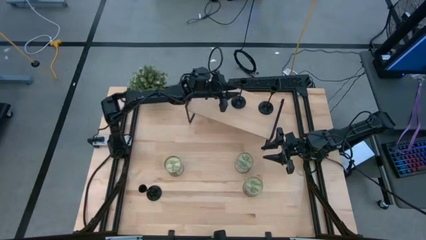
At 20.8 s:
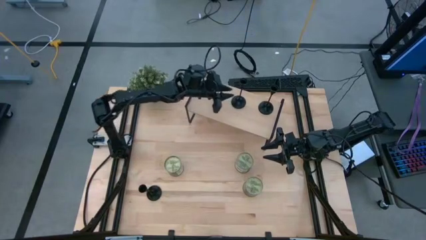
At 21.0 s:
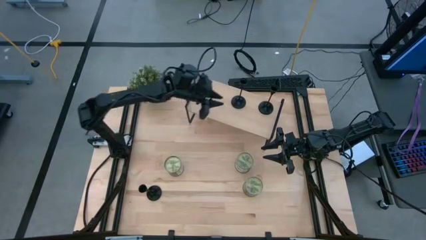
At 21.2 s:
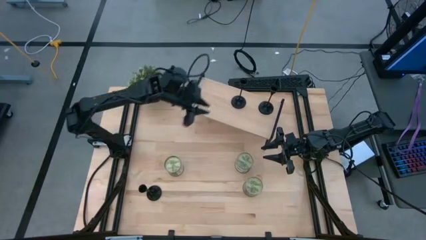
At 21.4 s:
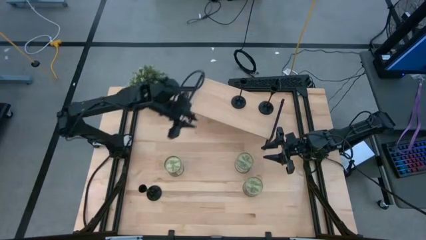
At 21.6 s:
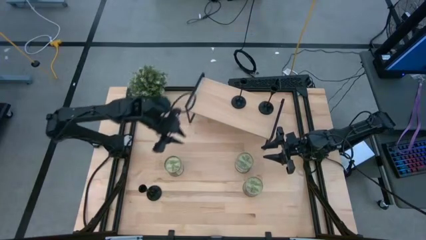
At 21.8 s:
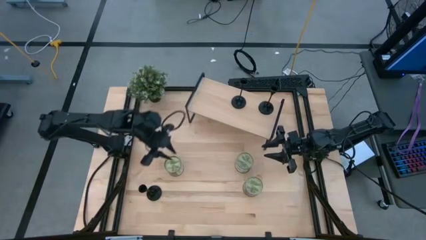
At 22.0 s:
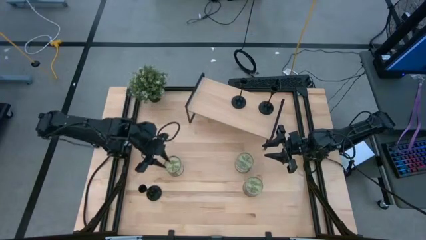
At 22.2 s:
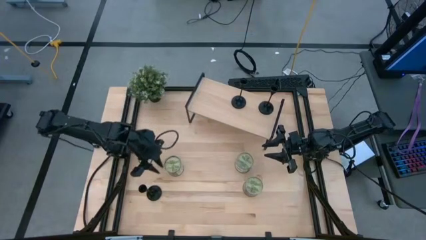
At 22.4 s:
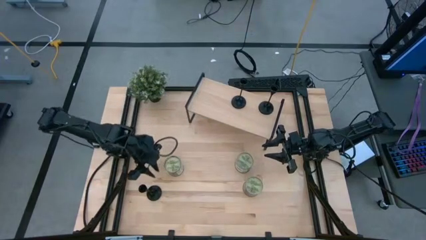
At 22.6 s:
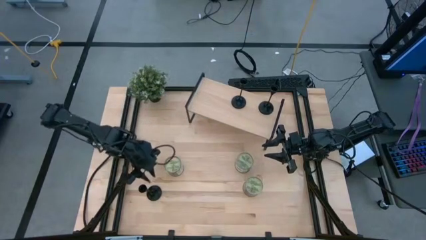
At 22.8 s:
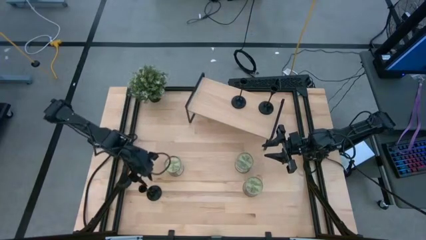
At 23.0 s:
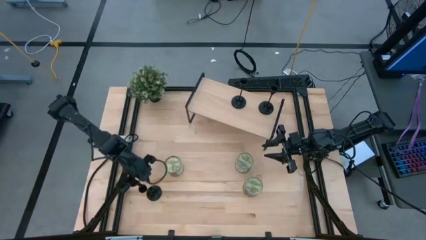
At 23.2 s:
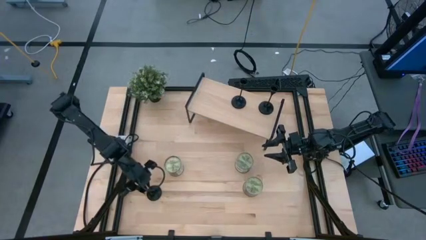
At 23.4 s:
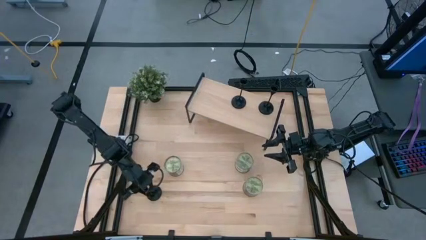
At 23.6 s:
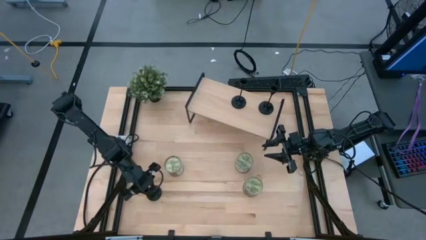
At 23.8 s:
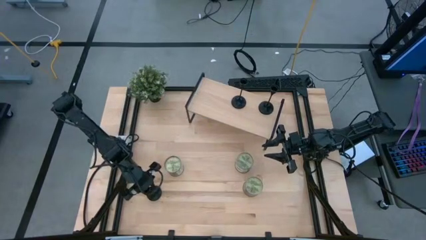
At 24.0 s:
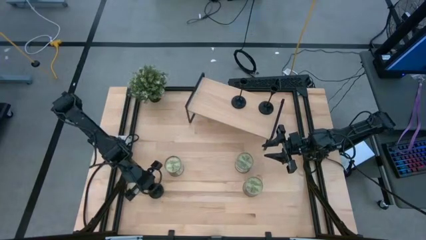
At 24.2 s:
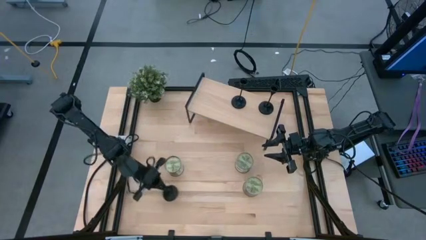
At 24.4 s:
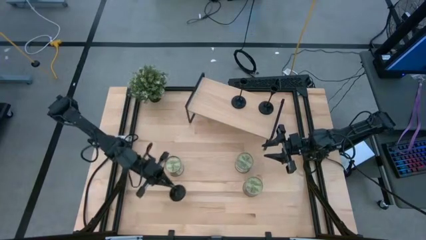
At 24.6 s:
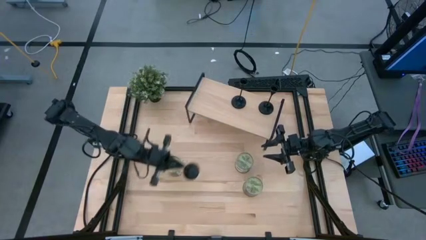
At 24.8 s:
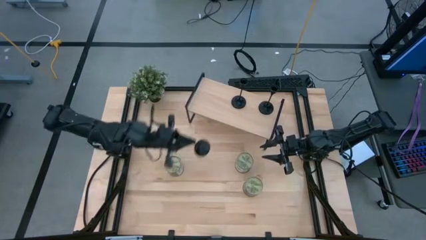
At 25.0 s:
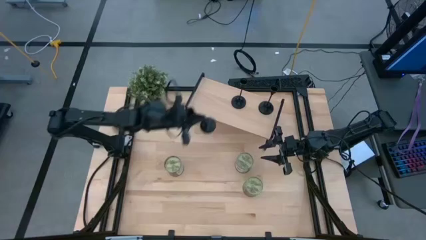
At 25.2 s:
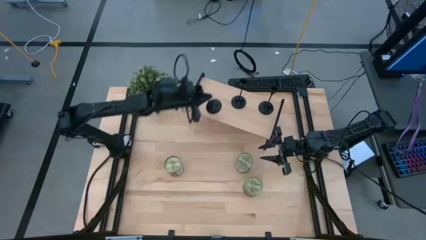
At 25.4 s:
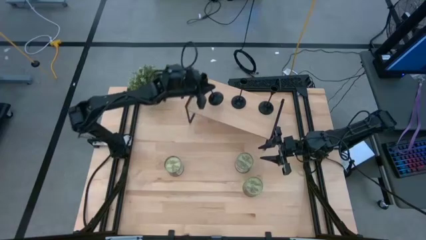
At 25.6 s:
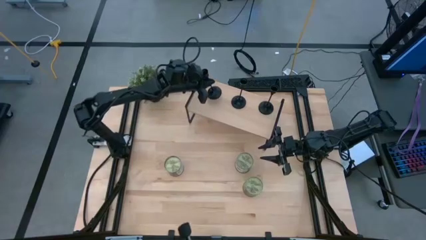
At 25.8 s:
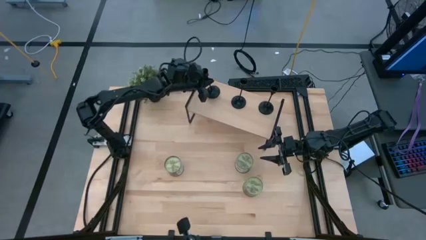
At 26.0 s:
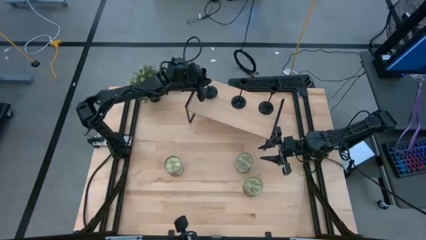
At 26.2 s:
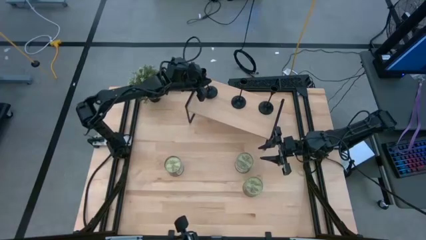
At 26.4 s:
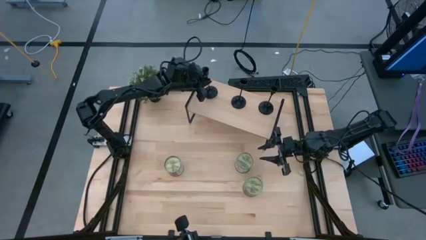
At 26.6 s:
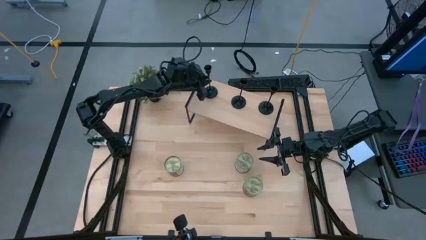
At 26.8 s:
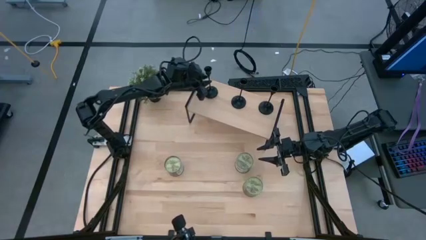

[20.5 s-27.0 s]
Task: Pick & Place candle stick holders
Align the black candle holder with the other black candle holder on the shelf

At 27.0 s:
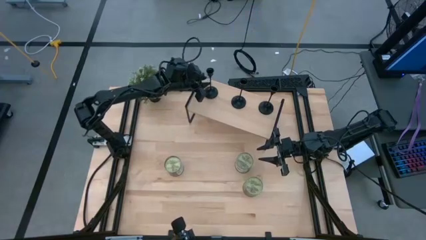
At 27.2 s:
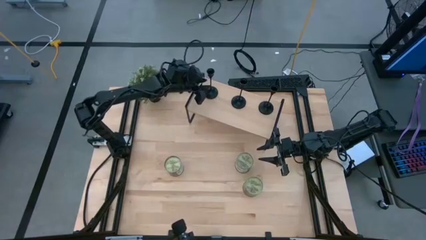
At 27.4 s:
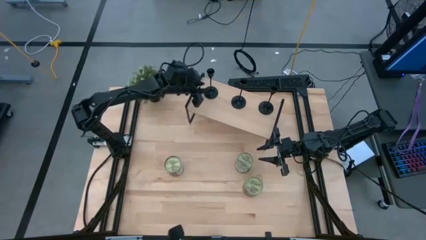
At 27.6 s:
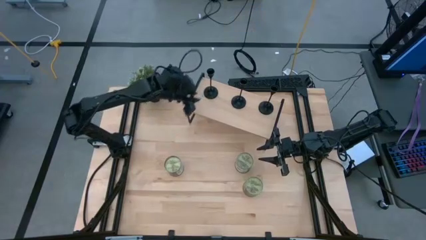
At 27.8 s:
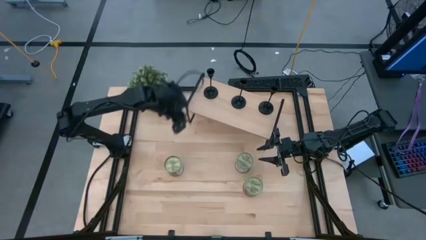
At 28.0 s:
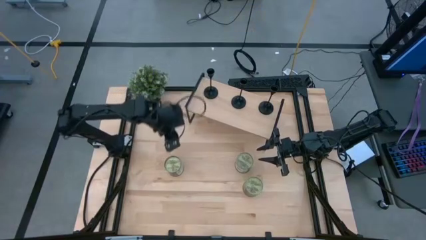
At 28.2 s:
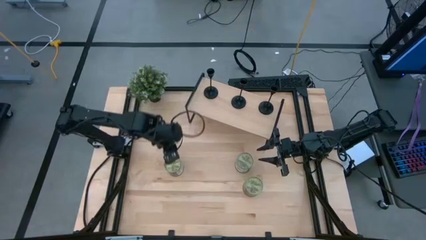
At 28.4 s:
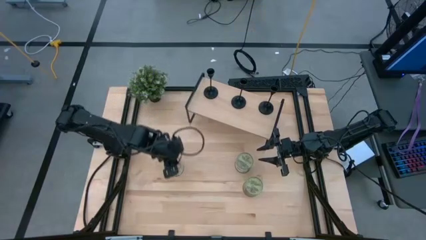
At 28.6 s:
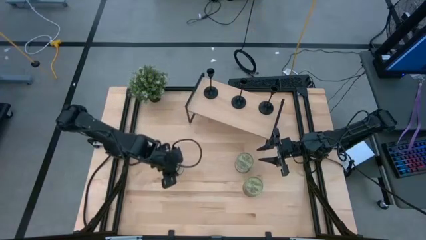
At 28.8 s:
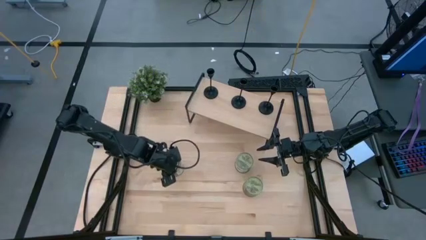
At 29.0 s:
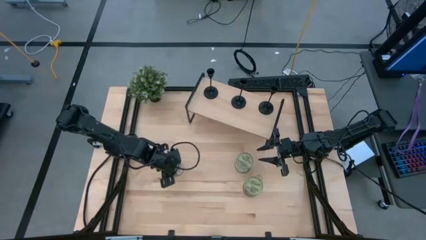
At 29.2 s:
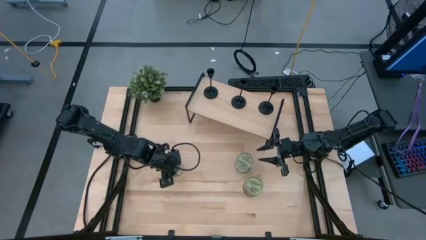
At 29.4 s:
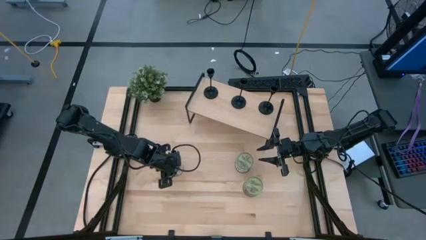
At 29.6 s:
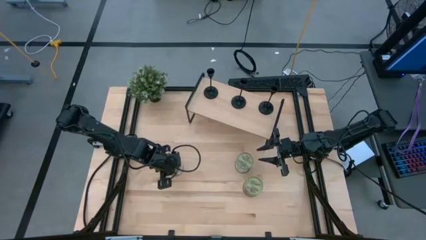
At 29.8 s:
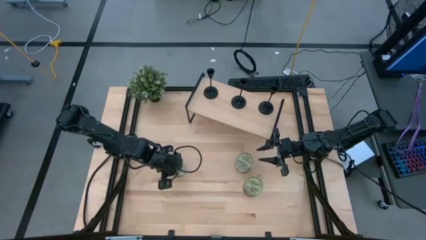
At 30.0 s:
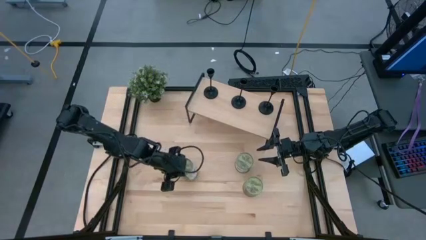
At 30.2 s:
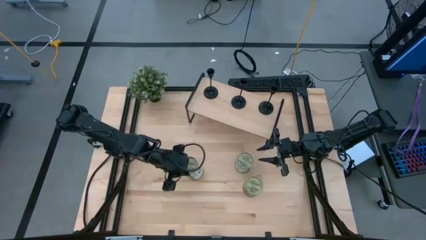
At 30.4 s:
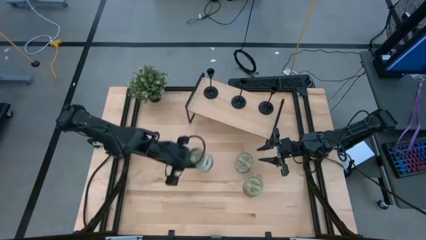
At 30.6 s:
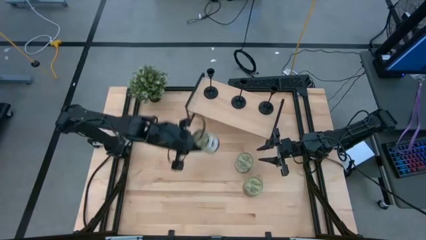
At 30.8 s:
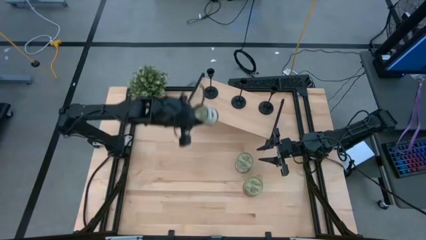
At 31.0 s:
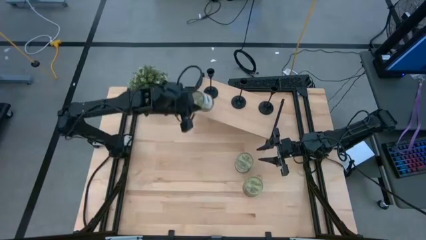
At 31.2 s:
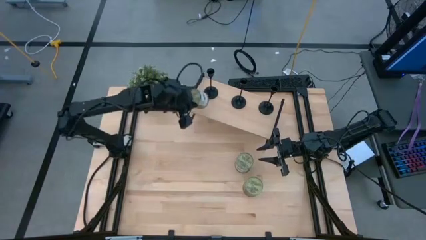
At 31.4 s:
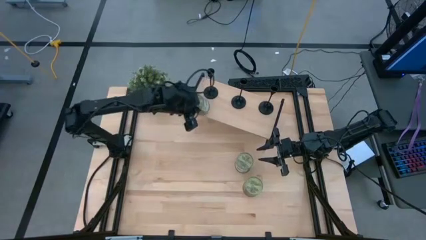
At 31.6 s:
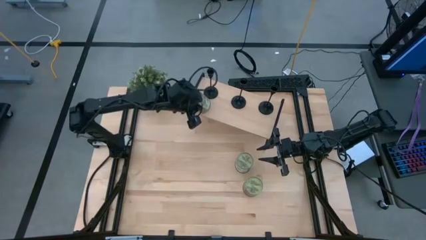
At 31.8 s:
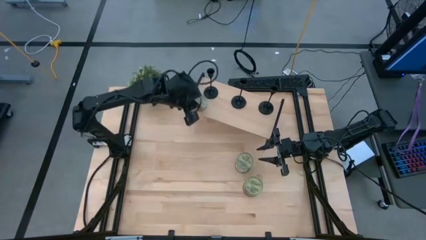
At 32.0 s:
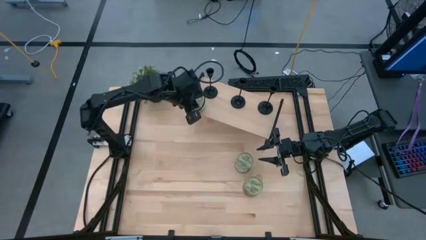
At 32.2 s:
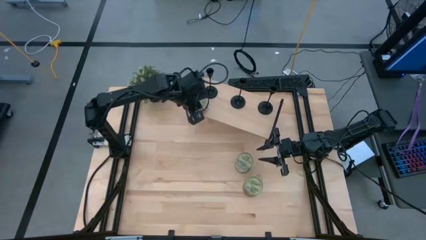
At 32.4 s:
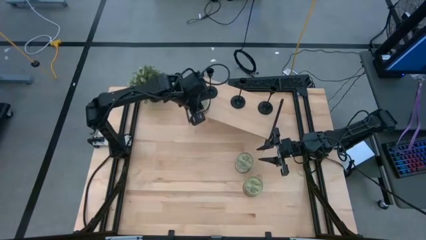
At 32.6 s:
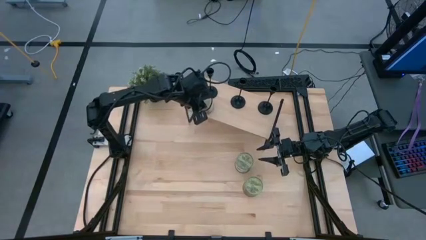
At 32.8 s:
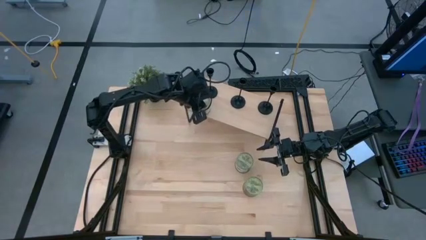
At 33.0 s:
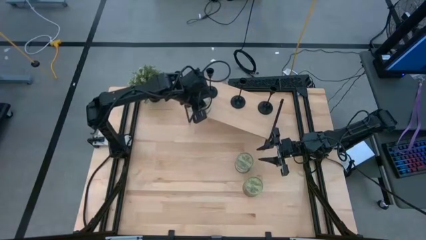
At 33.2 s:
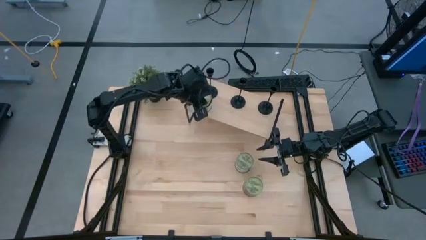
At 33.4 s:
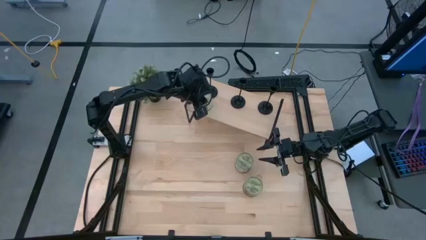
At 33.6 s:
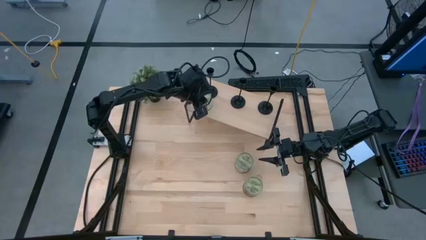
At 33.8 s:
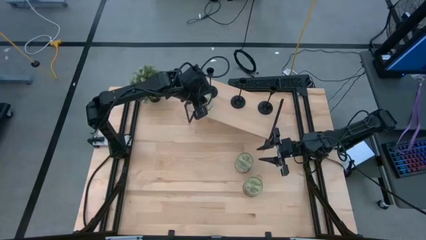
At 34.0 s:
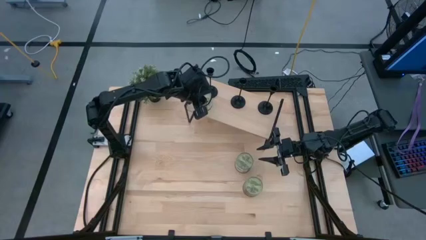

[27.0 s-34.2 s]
Put the left silver scented candle on the shelf

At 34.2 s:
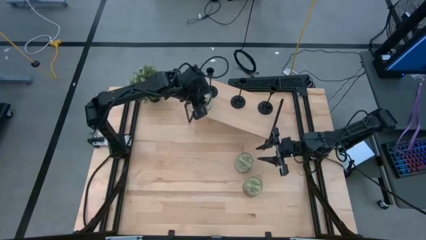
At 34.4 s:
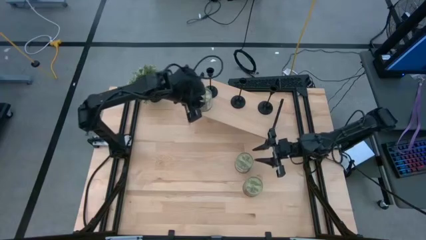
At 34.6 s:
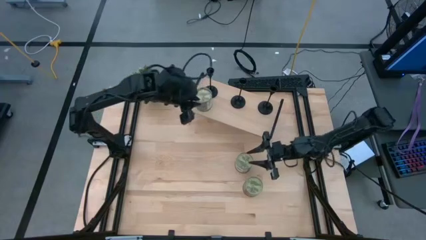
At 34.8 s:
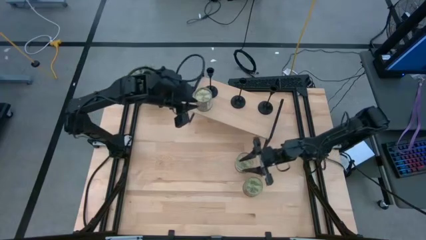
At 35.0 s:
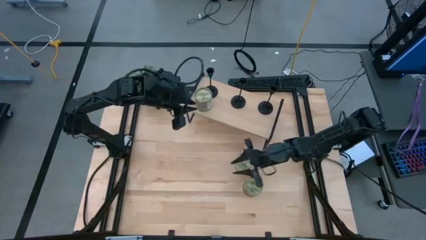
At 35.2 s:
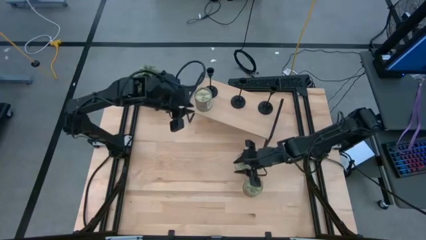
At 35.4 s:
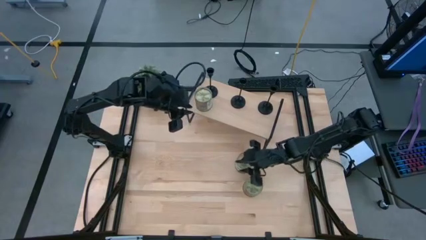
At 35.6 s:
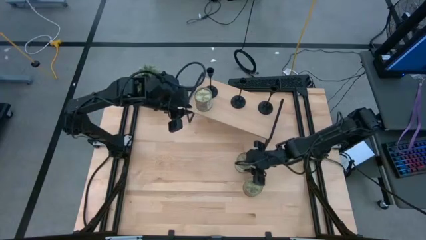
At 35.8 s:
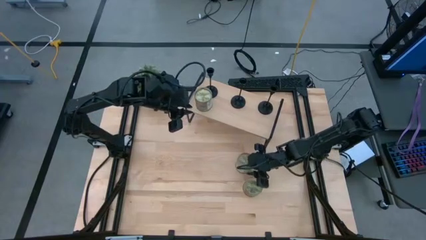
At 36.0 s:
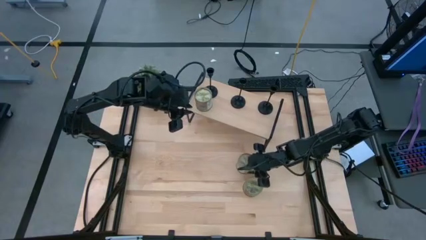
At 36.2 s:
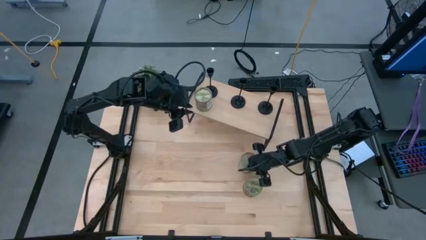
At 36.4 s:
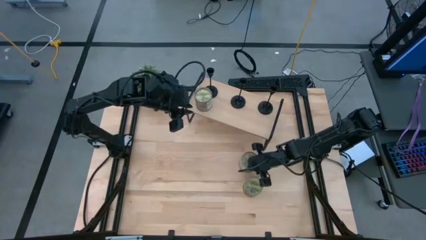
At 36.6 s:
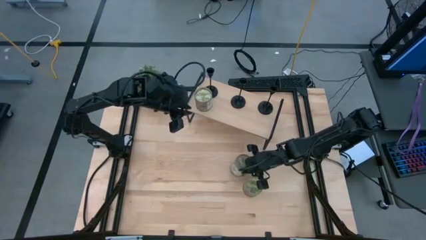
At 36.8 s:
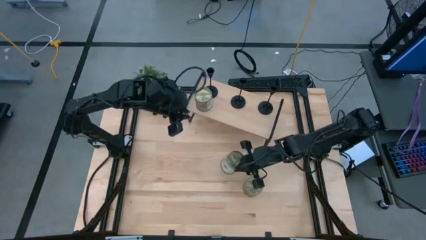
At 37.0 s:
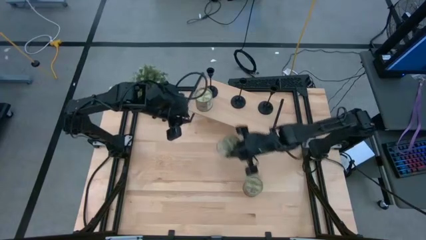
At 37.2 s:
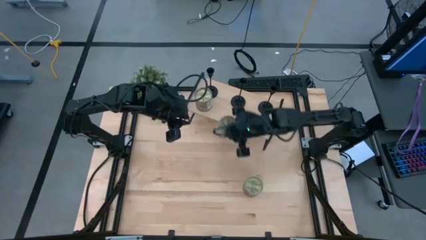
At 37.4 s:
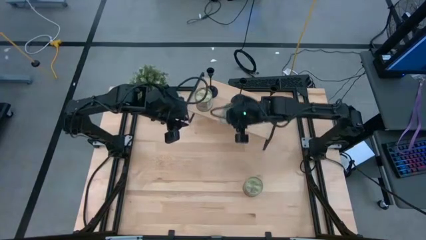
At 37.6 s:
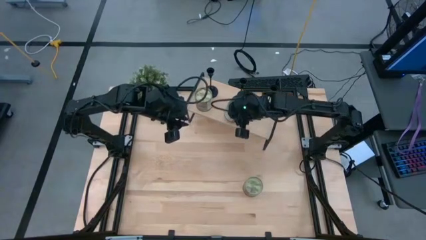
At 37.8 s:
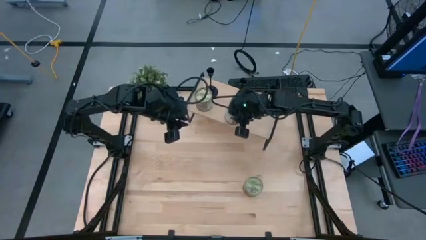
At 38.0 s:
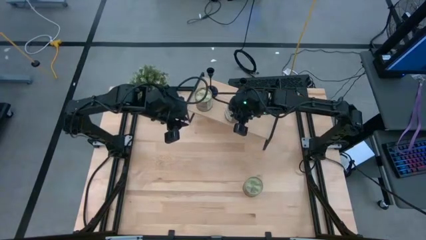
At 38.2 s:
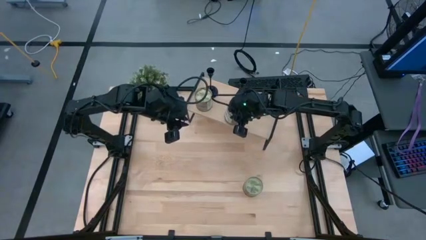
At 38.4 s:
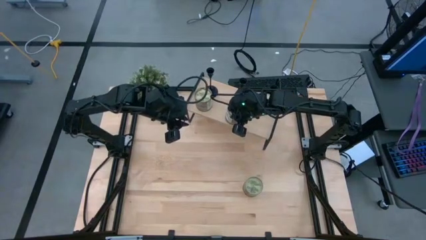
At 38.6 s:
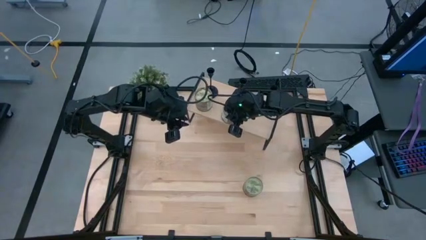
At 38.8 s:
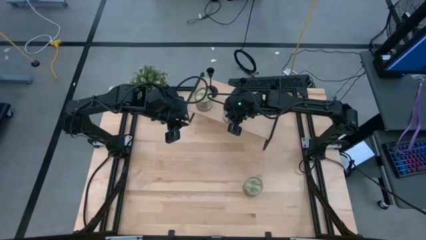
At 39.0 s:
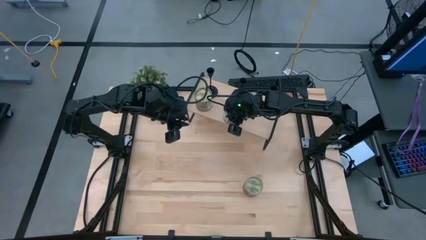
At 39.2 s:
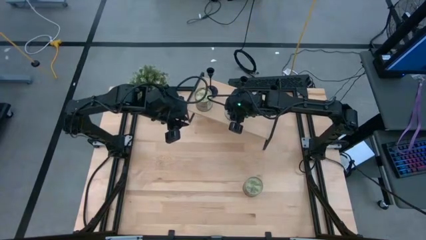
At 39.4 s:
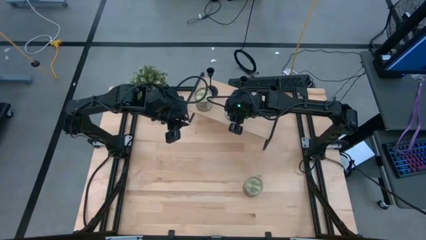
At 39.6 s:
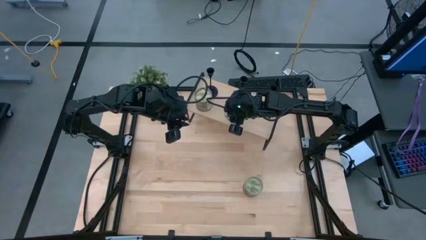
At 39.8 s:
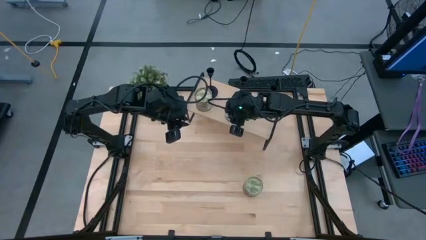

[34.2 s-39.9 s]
Align the top silver scented candle with the other silver scented candle on the shelf
